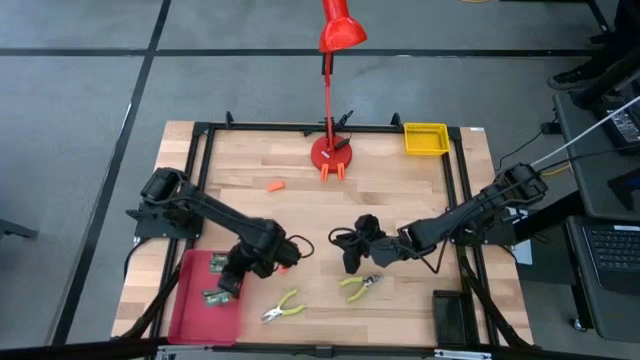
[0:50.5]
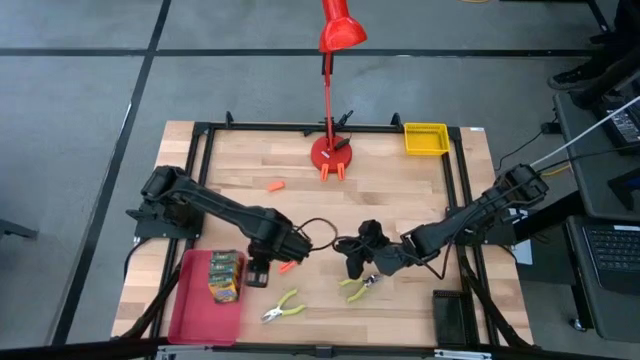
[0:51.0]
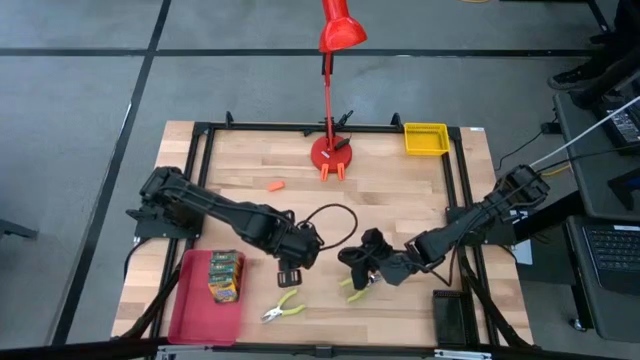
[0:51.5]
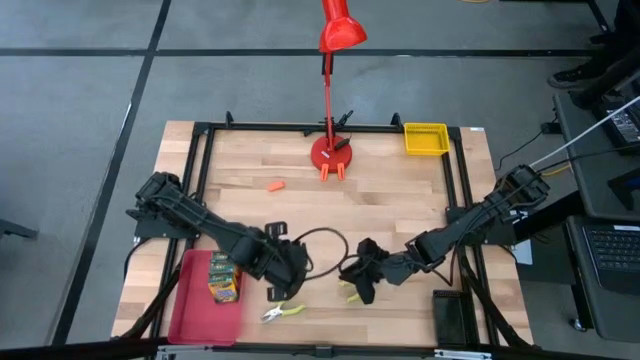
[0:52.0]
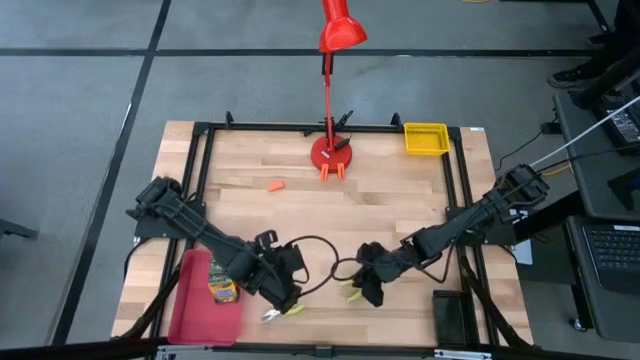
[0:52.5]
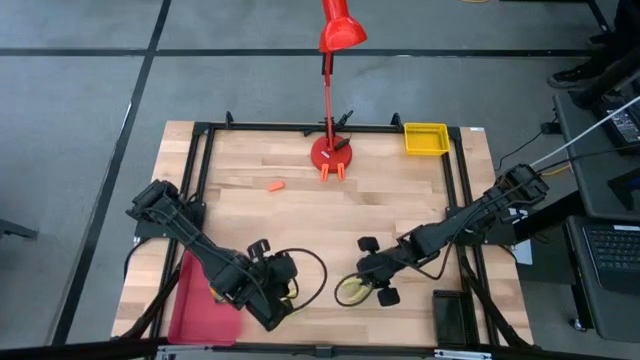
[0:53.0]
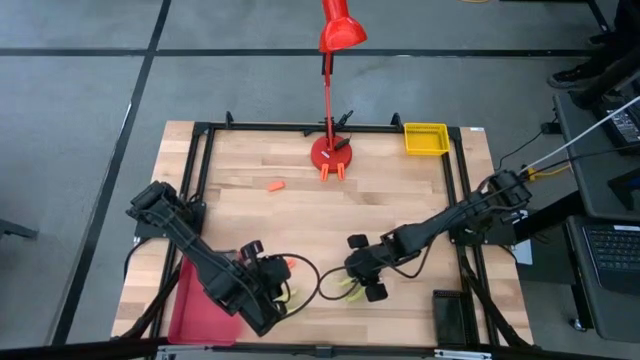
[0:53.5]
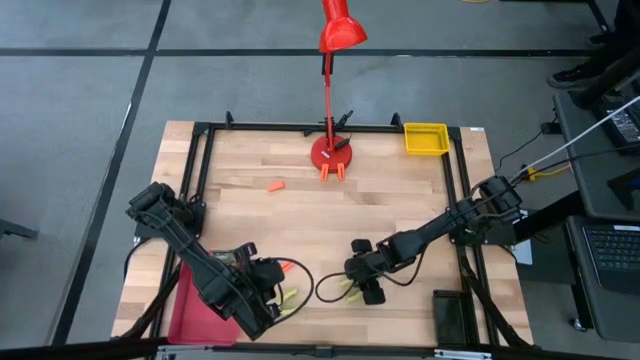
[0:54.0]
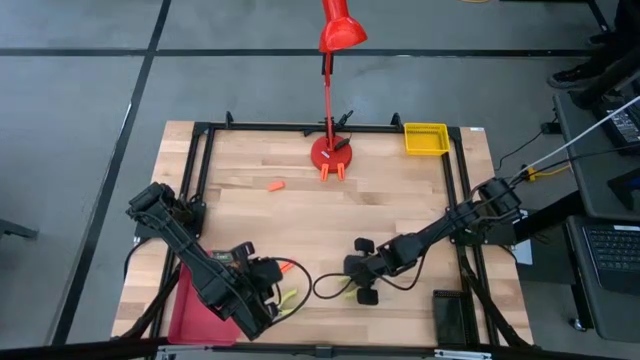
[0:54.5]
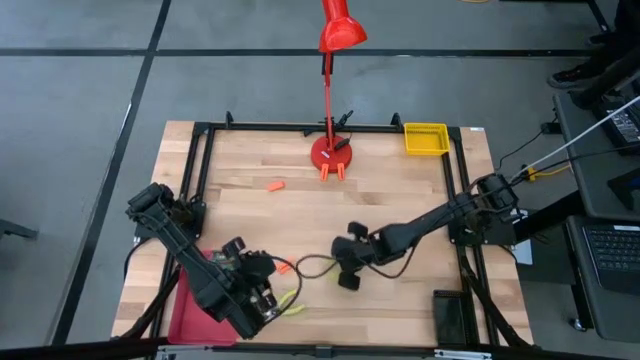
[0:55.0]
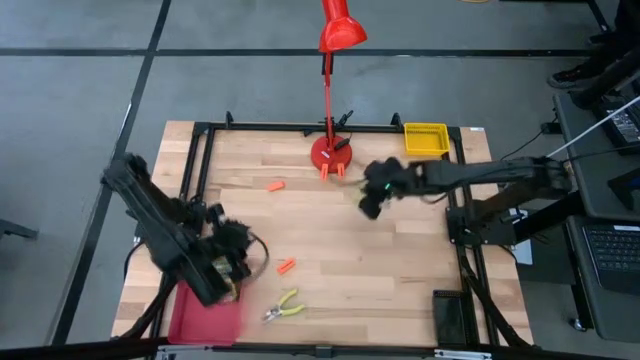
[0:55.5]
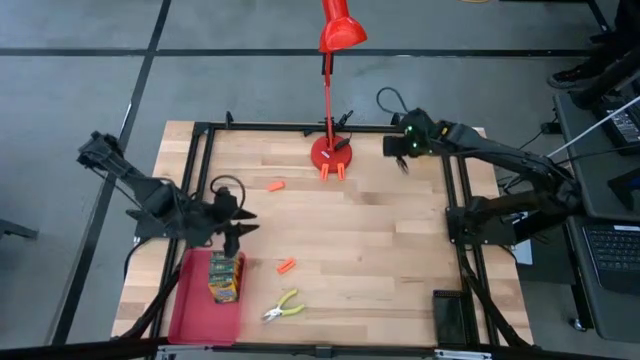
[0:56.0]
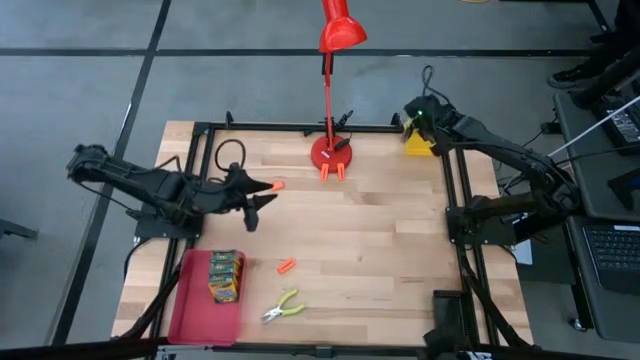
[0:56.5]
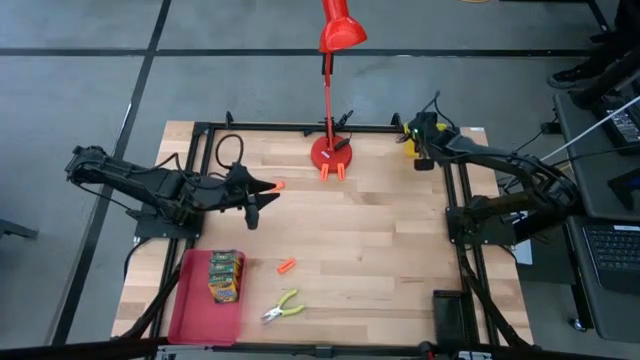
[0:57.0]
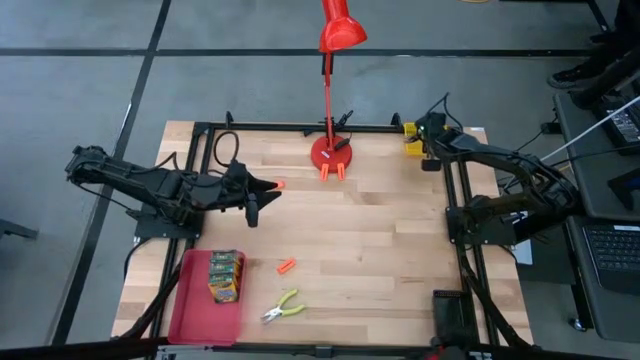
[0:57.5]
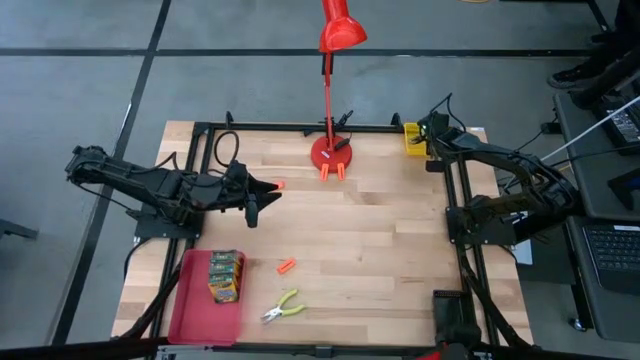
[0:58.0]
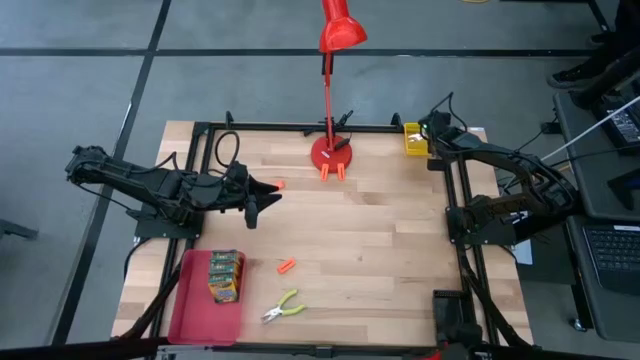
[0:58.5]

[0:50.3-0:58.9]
Task: Pick & Place School Supplies
Put the green hole puncher into the yellow bin

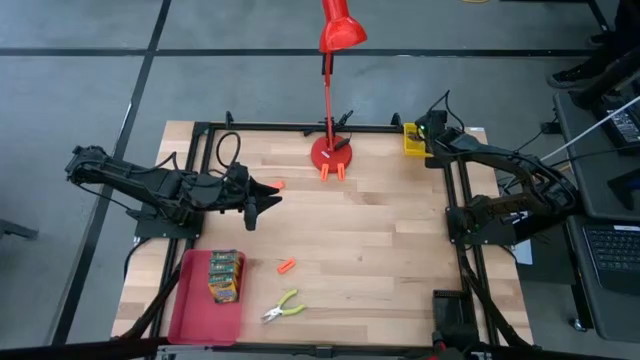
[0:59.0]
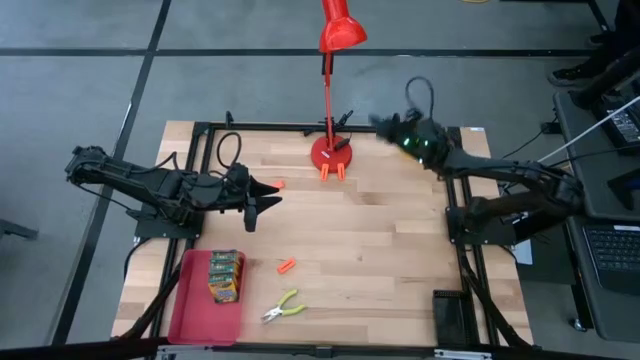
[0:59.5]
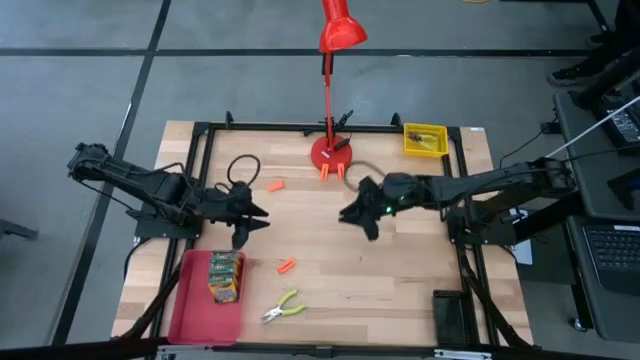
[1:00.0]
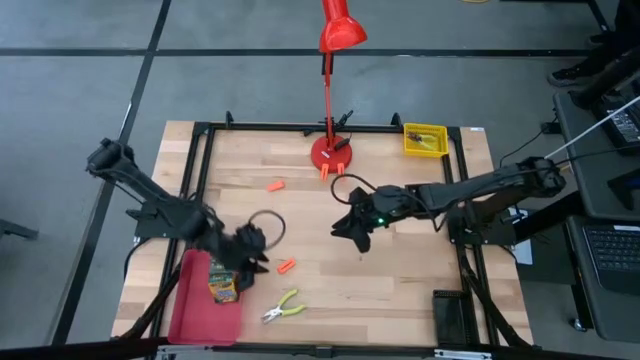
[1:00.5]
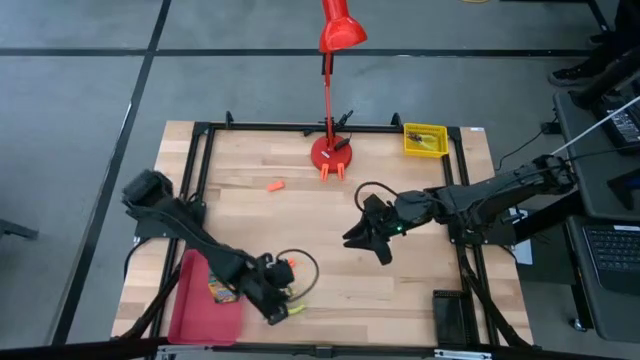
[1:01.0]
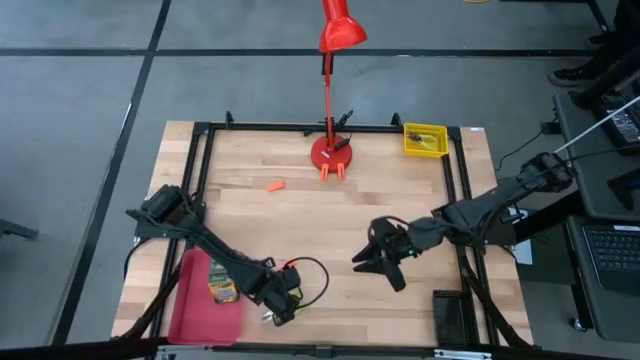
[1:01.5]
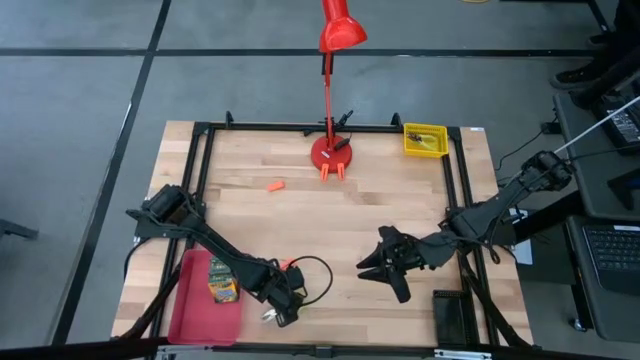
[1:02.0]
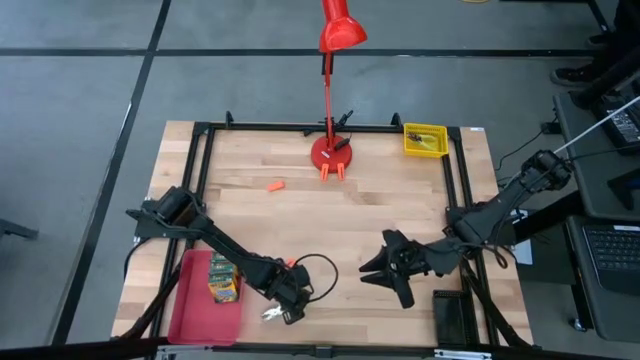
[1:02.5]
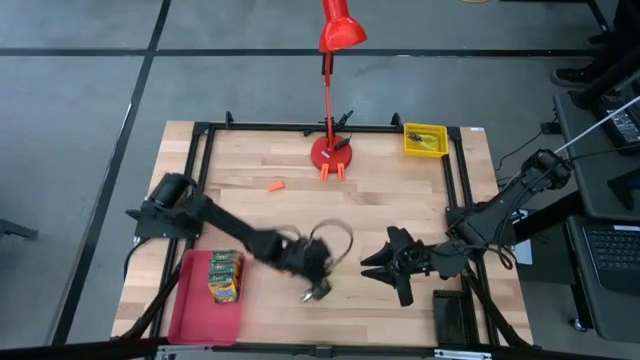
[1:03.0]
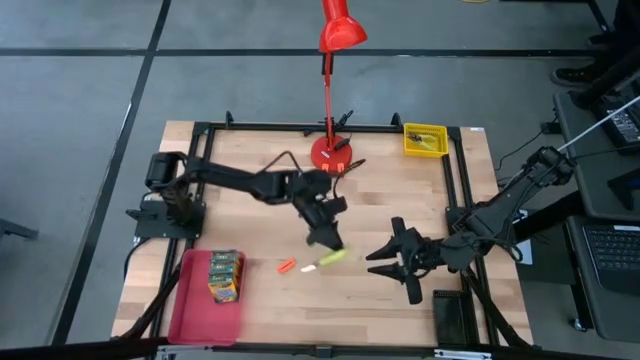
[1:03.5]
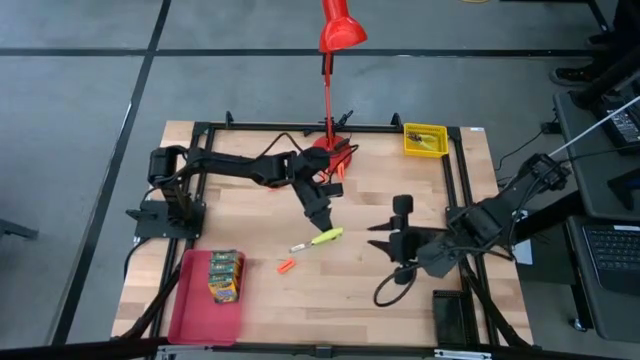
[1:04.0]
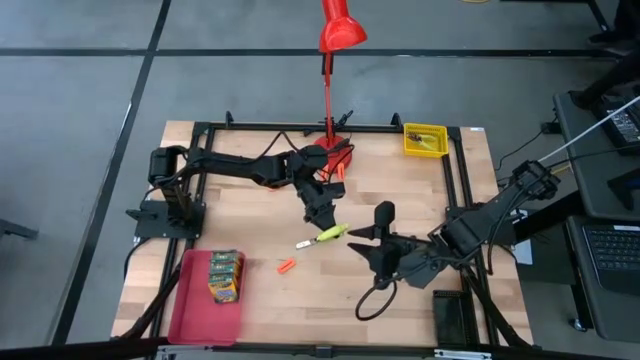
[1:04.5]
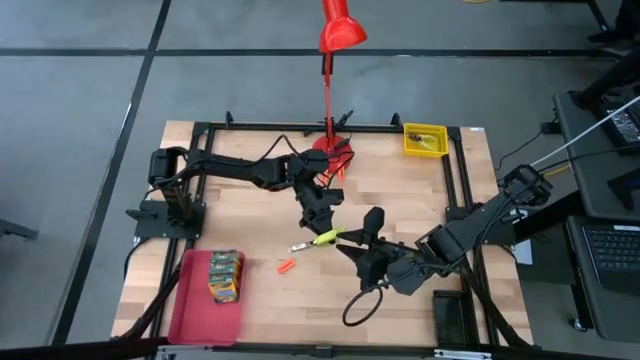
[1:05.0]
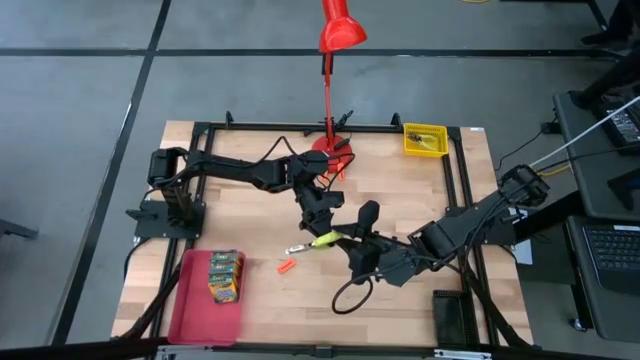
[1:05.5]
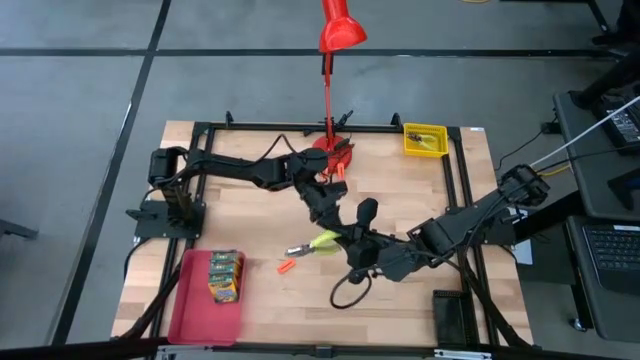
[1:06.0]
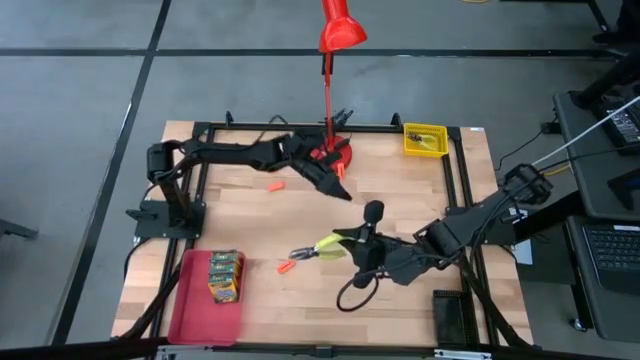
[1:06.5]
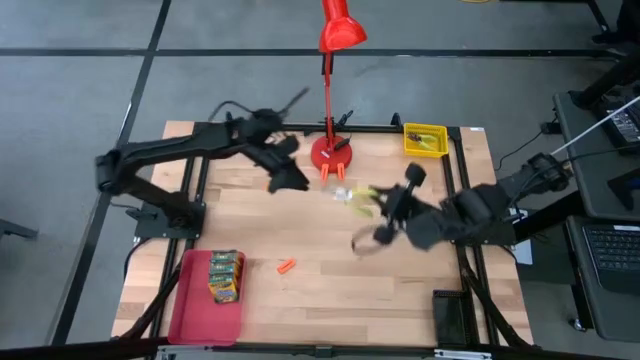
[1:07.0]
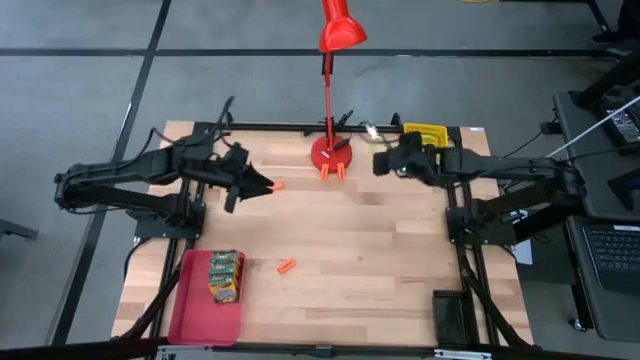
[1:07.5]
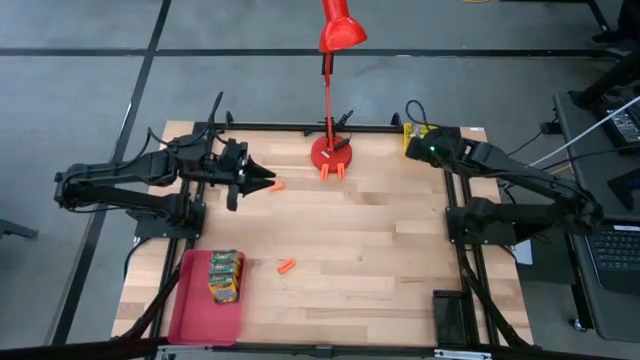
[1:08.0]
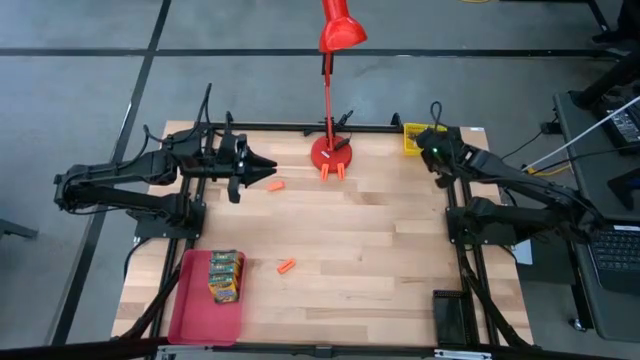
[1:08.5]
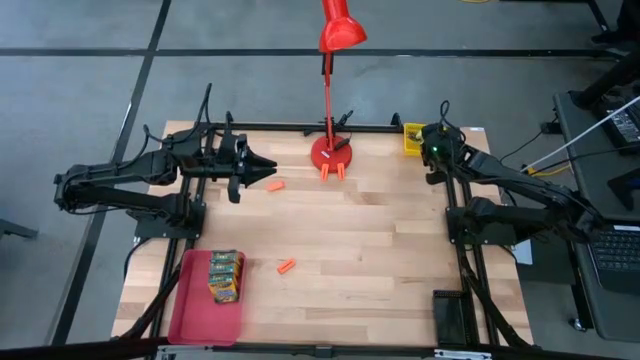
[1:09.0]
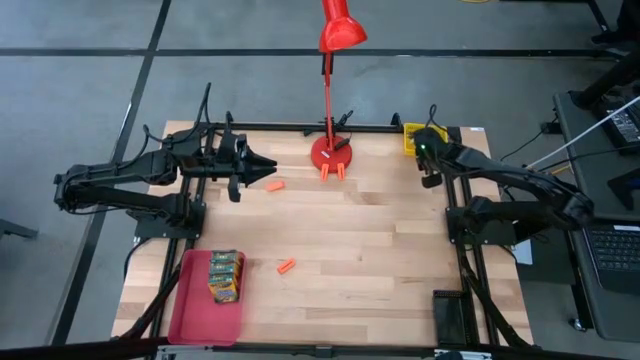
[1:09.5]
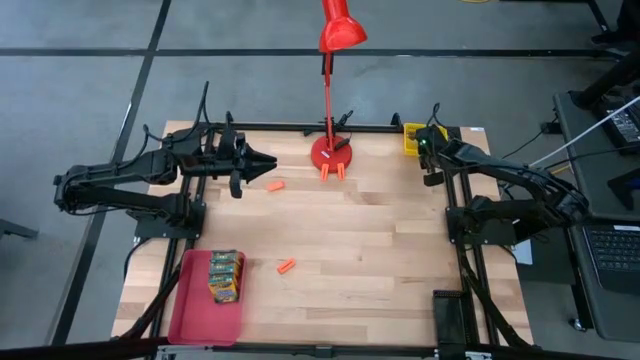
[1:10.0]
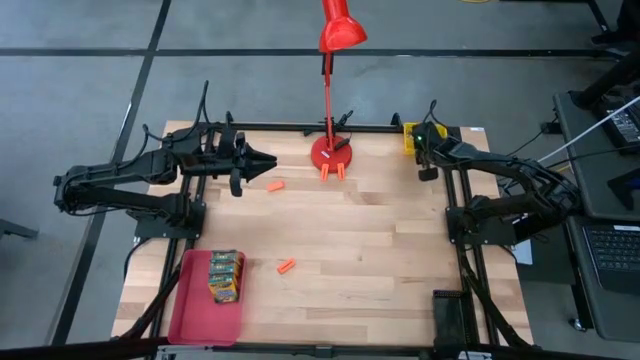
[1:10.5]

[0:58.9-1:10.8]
Put the green hole puncher into the yellow bin
